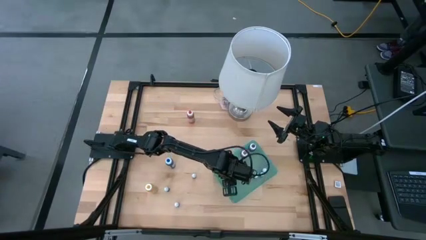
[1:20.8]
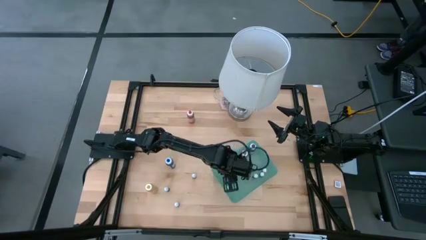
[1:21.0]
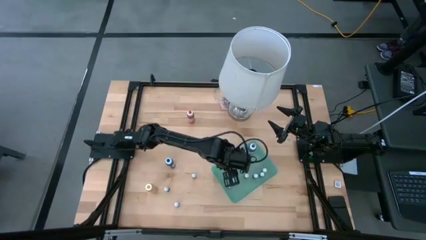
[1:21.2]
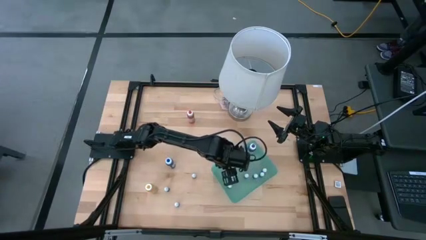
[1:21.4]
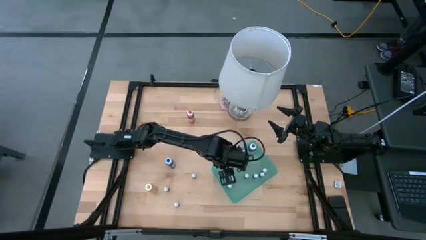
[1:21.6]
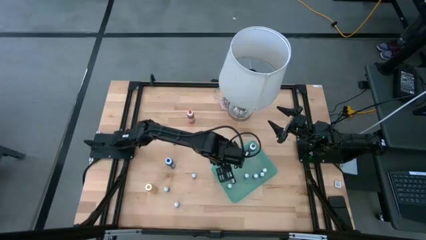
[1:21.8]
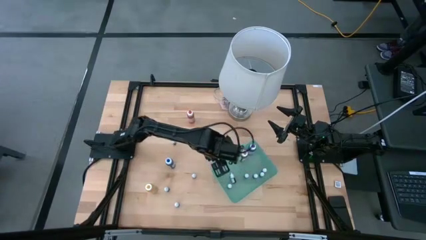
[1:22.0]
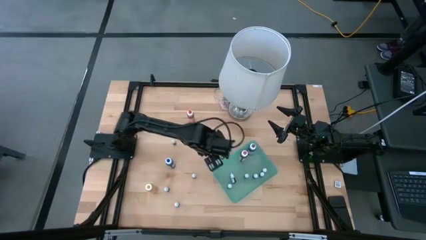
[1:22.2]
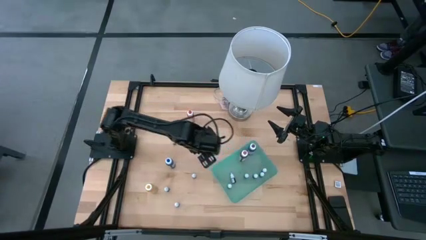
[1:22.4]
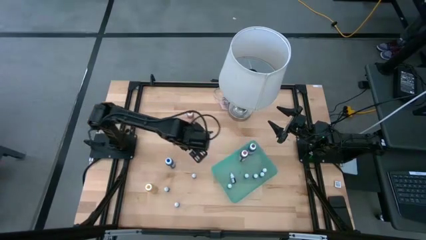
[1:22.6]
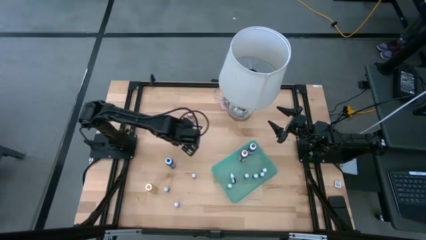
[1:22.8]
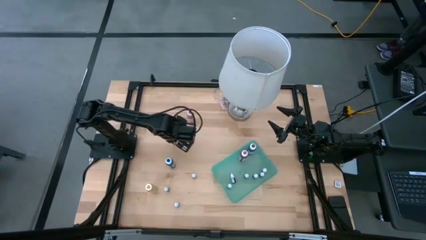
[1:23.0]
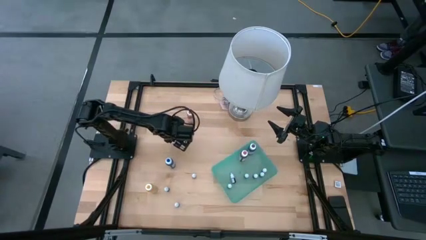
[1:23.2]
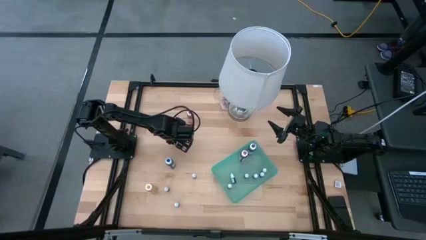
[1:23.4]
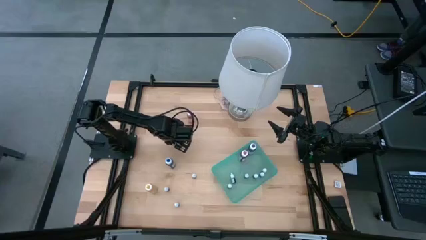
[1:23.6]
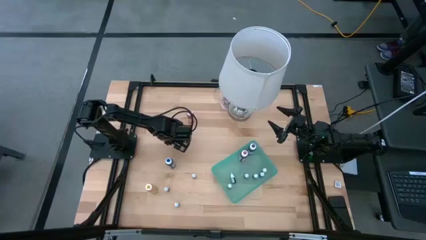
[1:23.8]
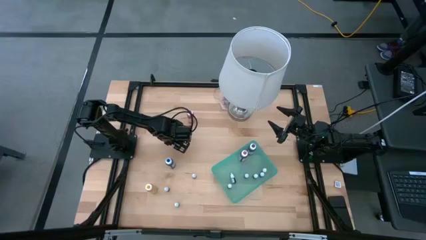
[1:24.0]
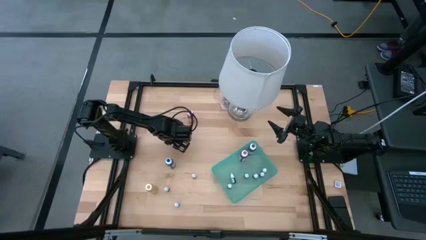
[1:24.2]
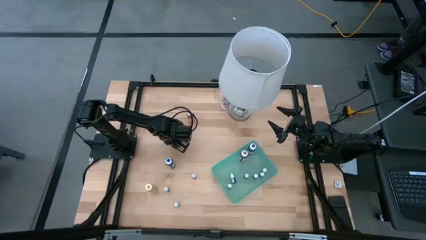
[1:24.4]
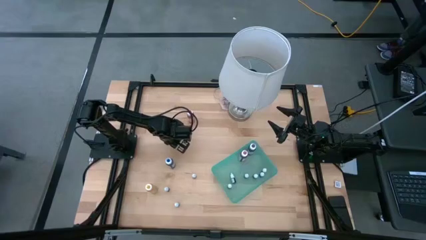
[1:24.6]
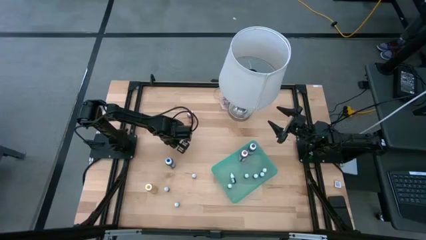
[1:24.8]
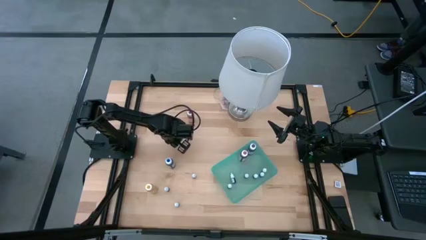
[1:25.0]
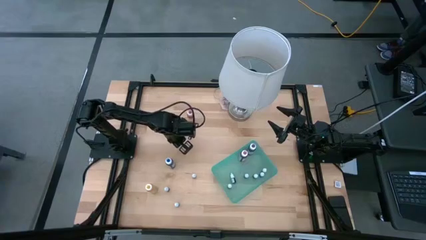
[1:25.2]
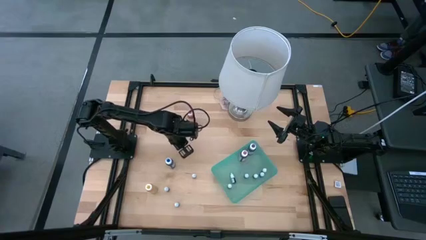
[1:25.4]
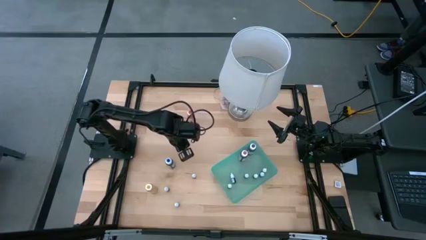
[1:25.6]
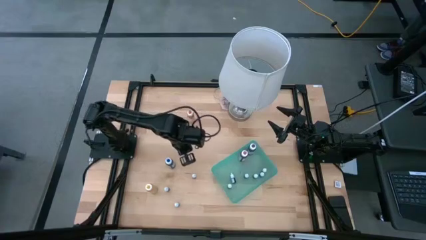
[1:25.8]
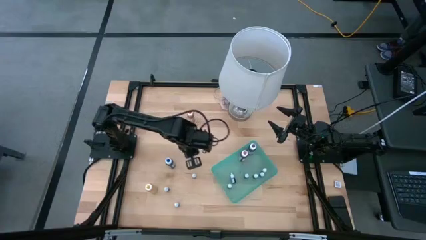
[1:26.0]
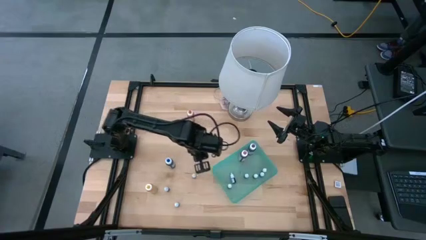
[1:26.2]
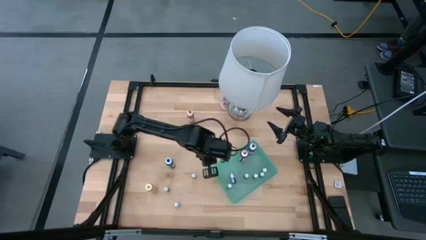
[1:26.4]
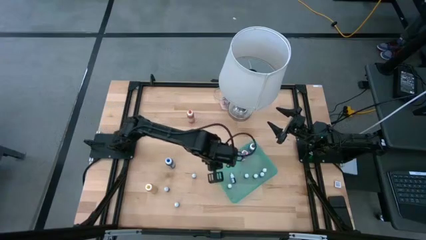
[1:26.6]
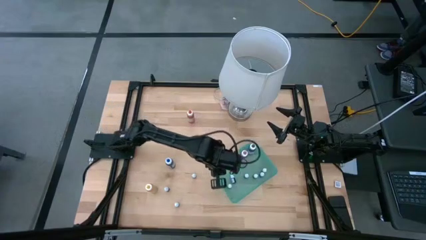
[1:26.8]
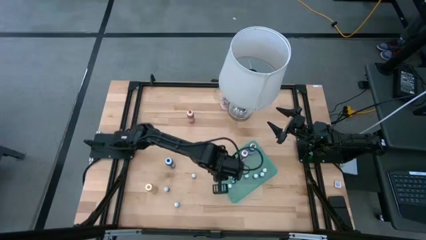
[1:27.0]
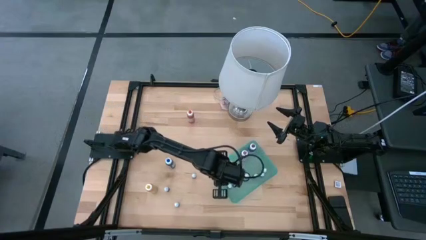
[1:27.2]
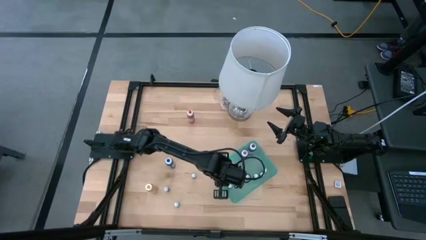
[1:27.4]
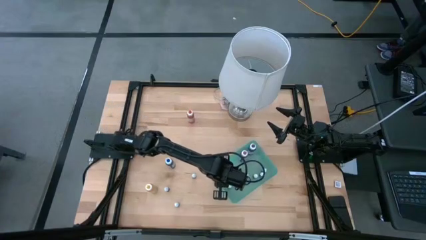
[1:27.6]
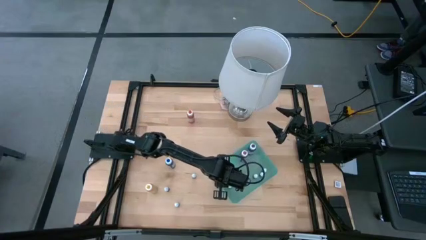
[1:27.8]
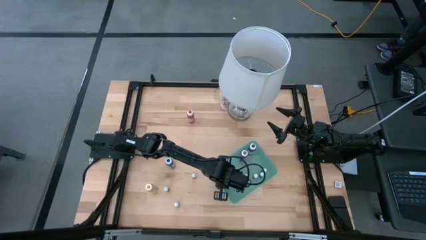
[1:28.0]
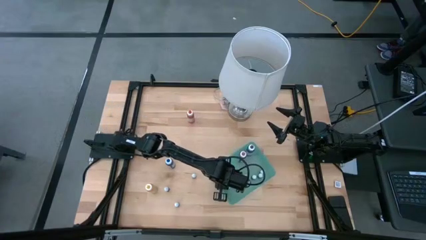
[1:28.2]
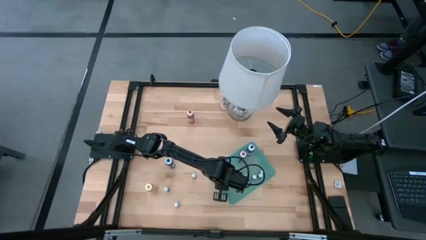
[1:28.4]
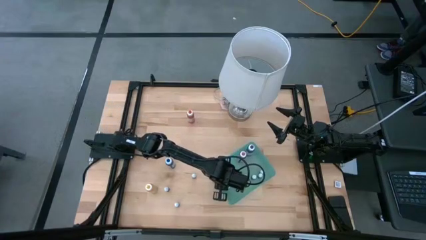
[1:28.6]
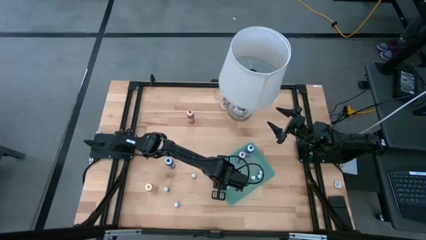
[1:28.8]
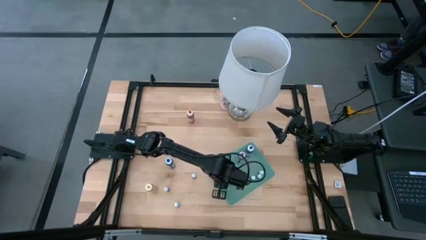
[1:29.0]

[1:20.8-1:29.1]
Task: Pick & Place food coloring
Put the small blue food coloring bottle into the green bin

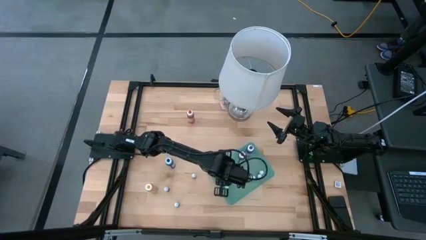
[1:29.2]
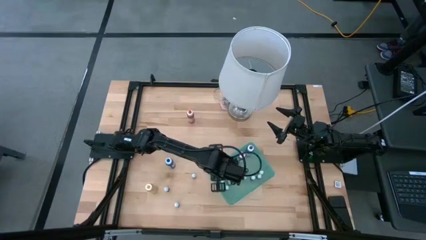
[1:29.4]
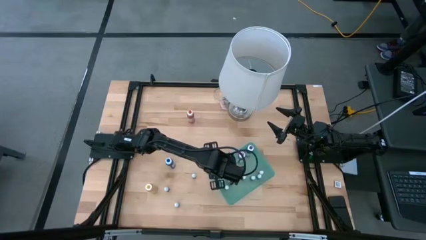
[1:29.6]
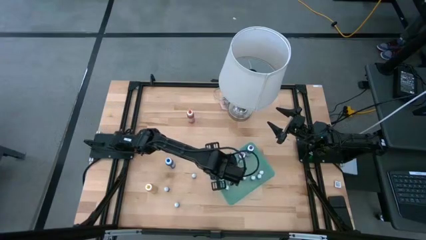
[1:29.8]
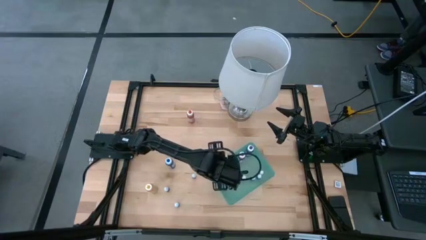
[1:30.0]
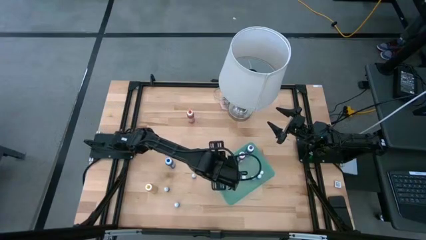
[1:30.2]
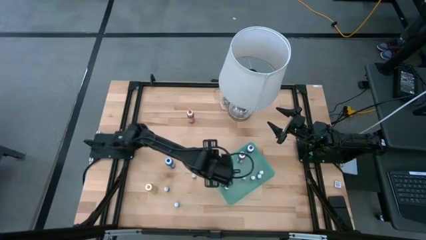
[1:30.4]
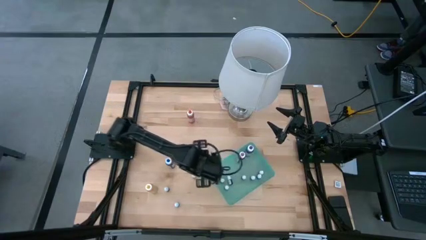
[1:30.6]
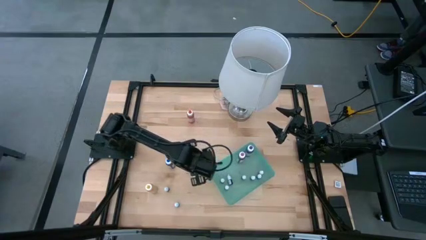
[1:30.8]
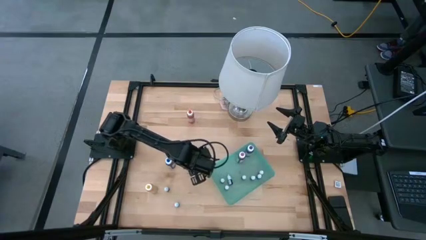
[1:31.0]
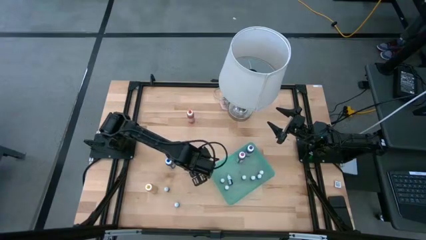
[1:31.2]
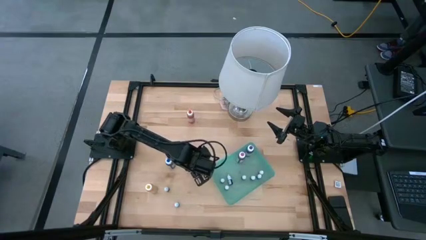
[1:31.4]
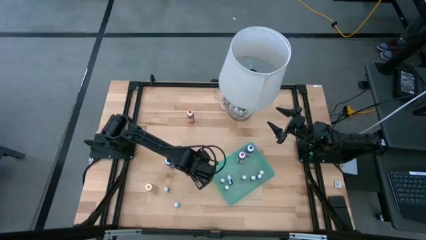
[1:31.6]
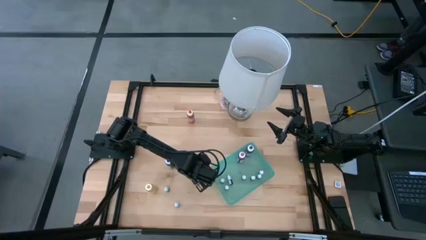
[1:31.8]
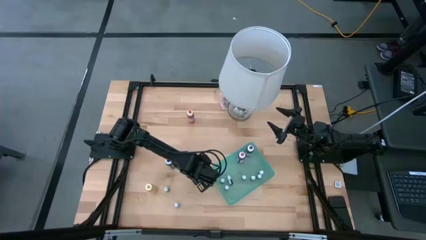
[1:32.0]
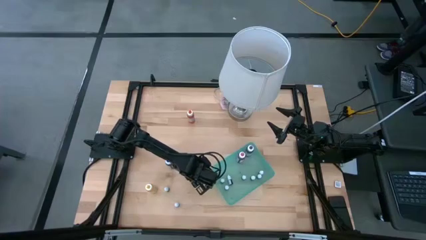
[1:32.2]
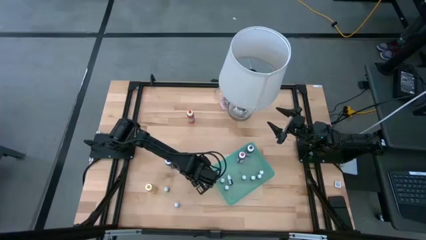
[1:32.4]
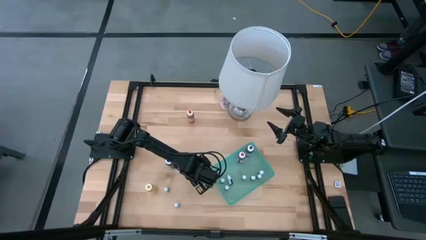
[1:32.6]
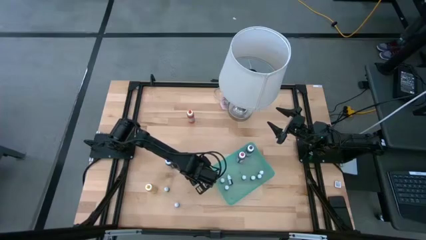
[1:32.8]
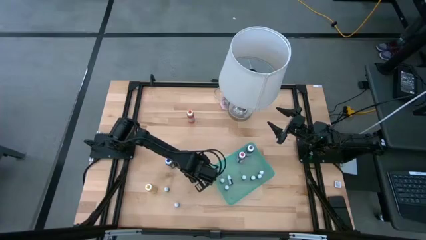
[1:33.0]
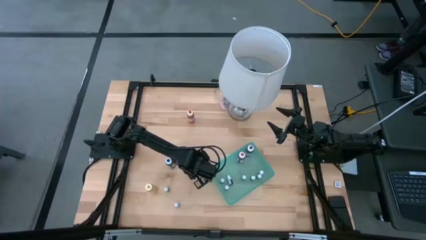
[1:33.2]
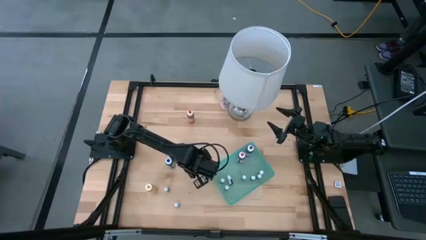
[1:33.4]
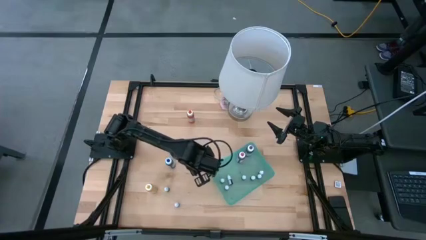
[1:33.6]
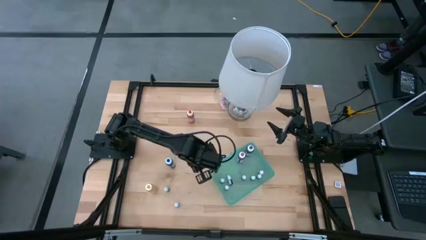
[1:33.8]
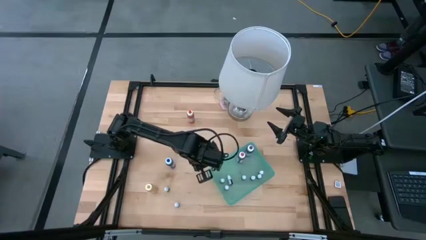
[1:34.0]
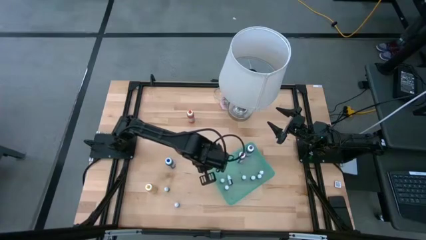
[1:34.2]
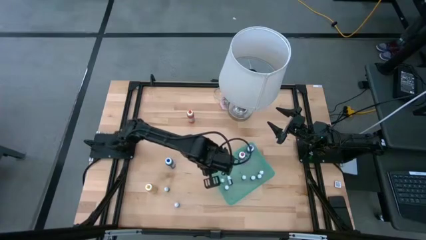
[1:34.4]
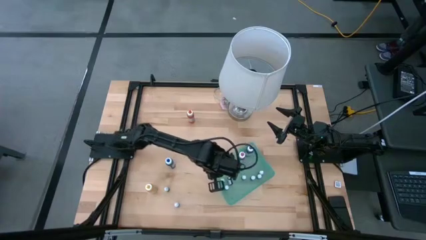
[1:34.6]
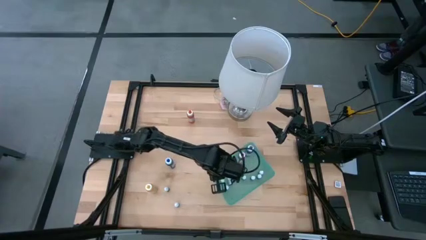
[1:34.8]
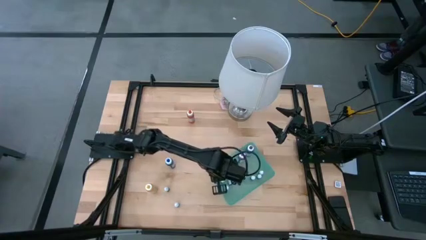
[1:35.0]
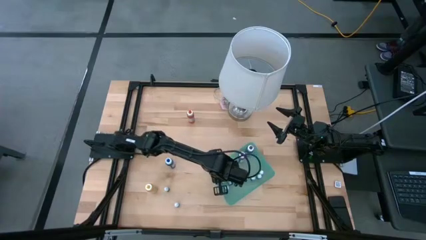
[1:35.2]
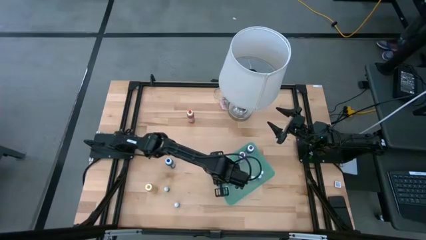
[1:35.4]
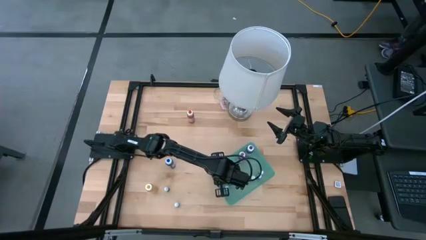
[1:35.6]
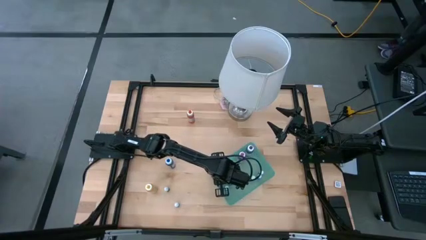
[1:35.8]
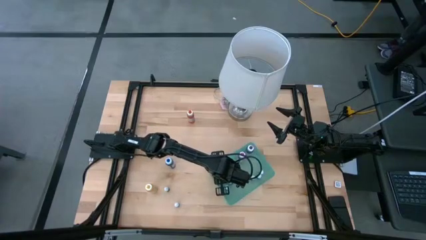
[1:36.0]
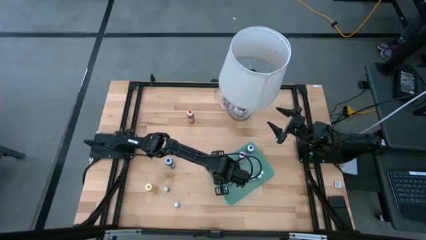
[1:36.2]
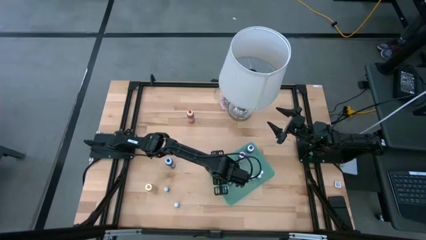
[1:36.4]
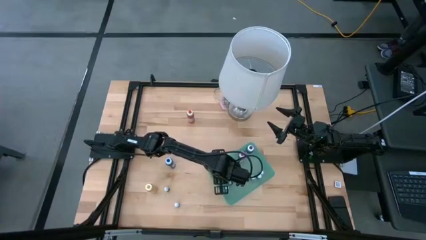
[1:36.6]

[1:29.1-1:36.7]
Put the small pink food coloring bottle into the green bin
